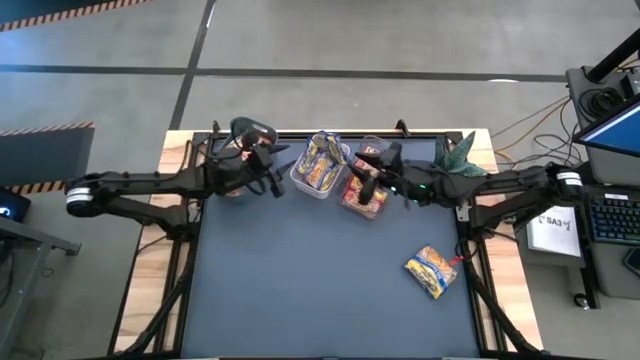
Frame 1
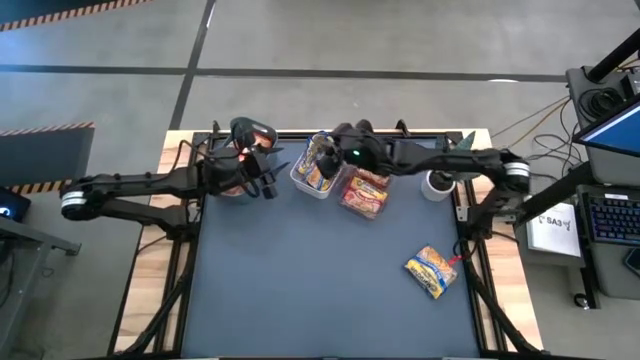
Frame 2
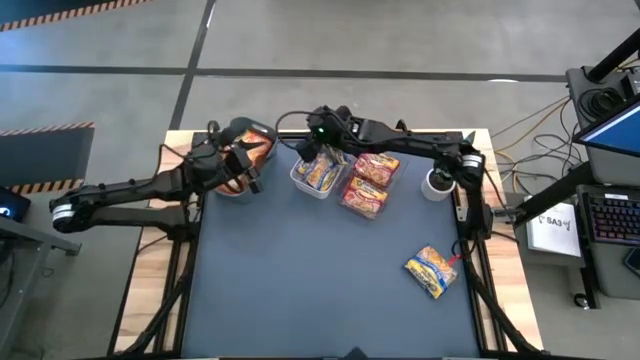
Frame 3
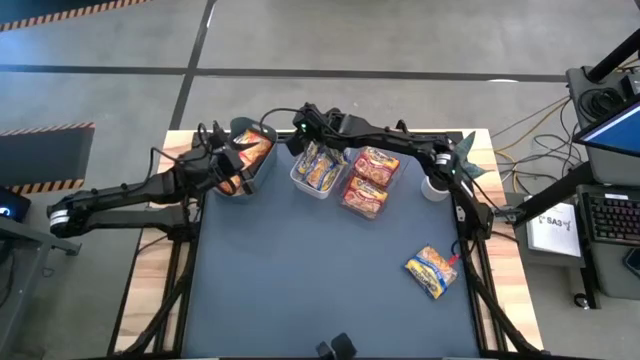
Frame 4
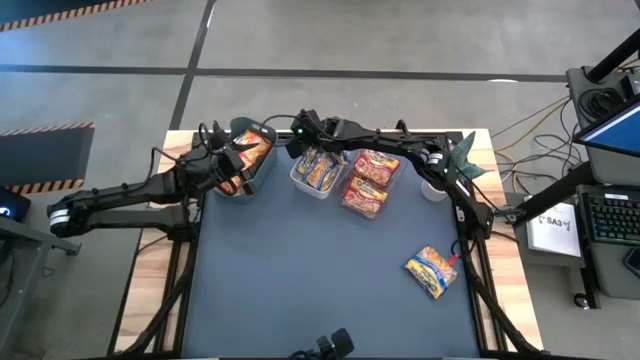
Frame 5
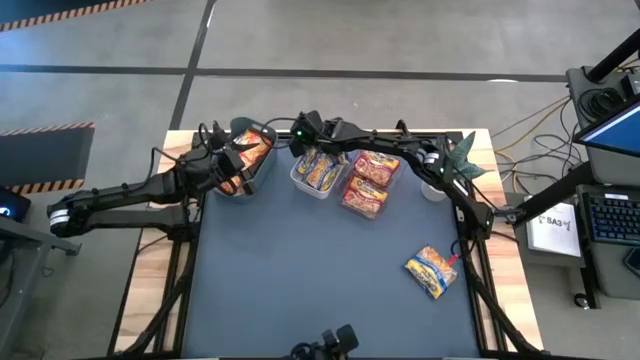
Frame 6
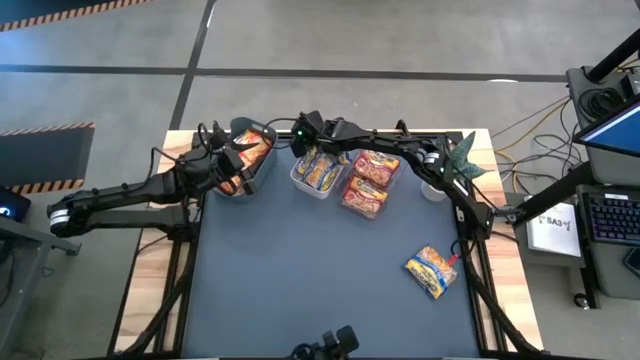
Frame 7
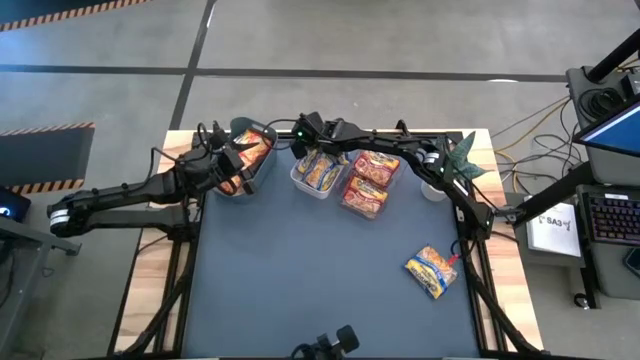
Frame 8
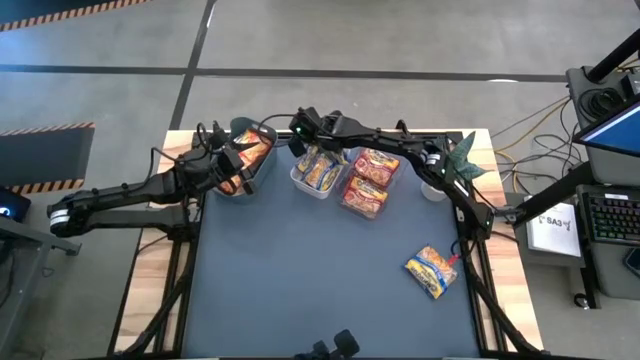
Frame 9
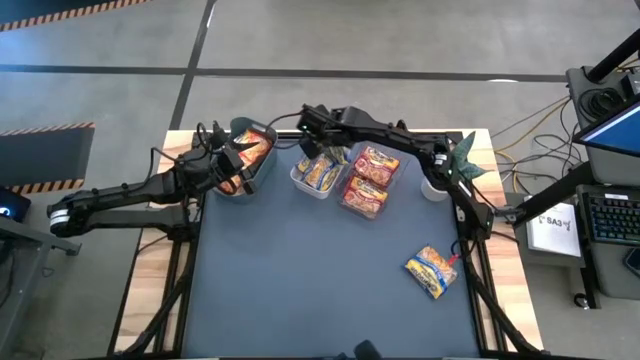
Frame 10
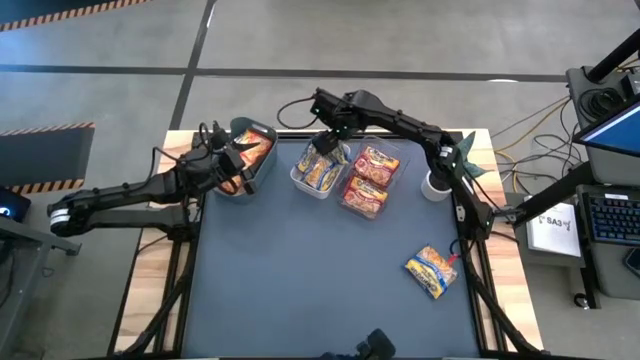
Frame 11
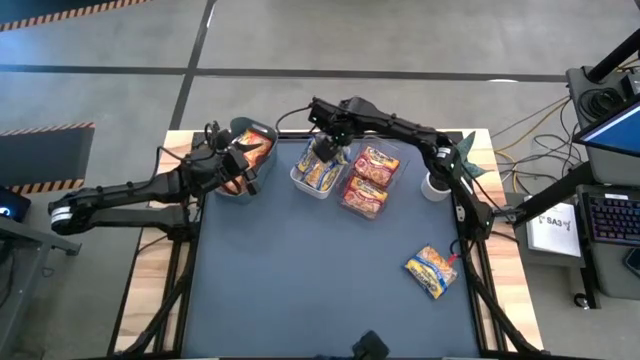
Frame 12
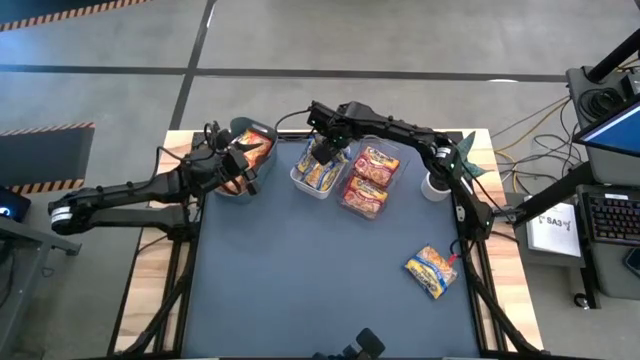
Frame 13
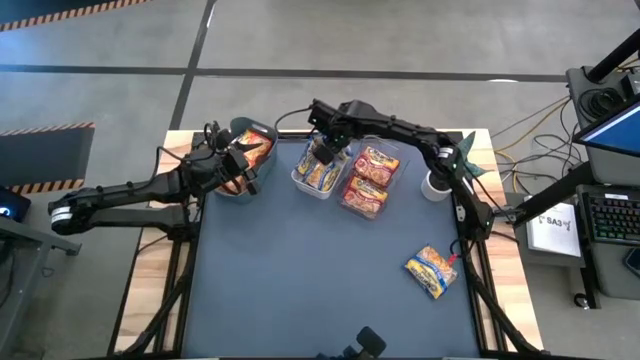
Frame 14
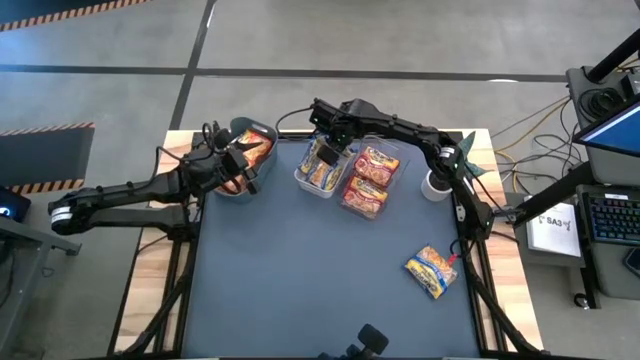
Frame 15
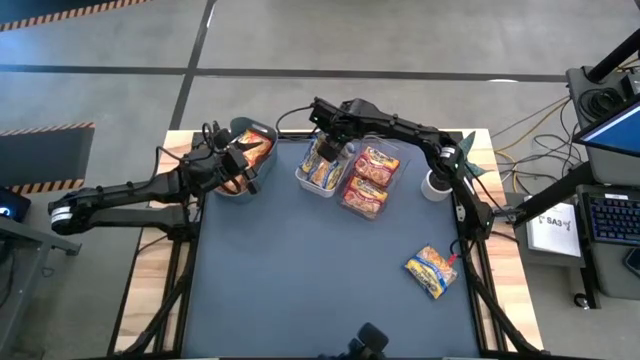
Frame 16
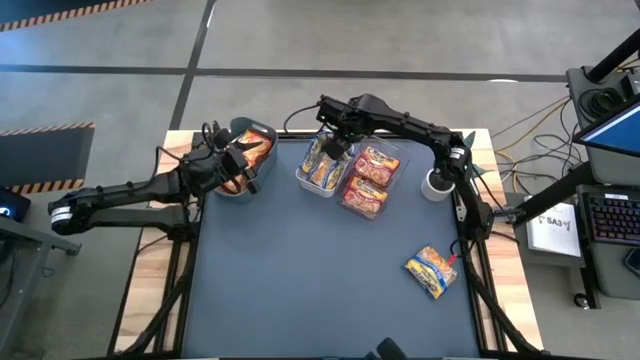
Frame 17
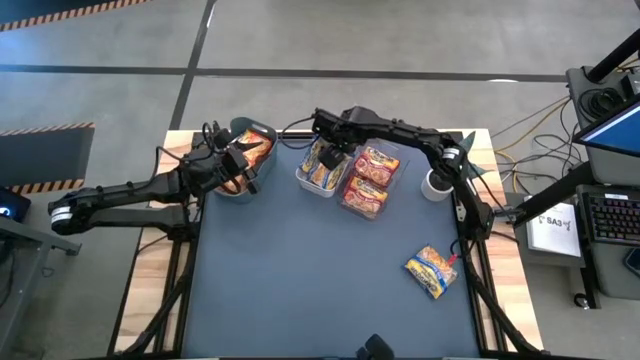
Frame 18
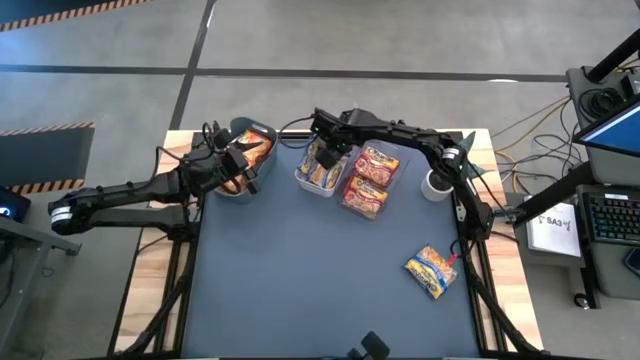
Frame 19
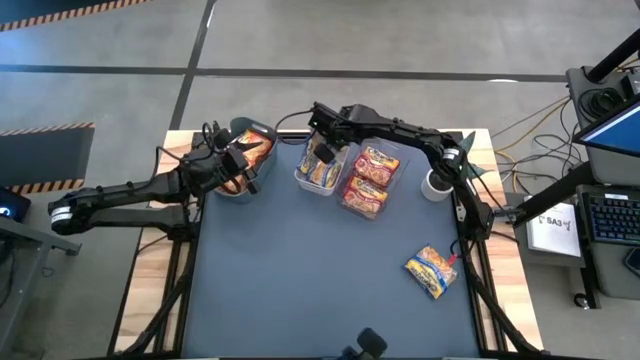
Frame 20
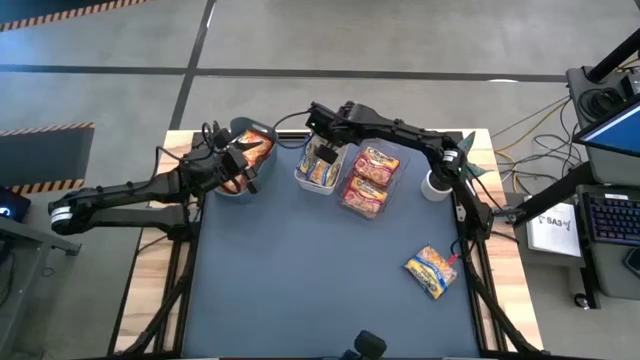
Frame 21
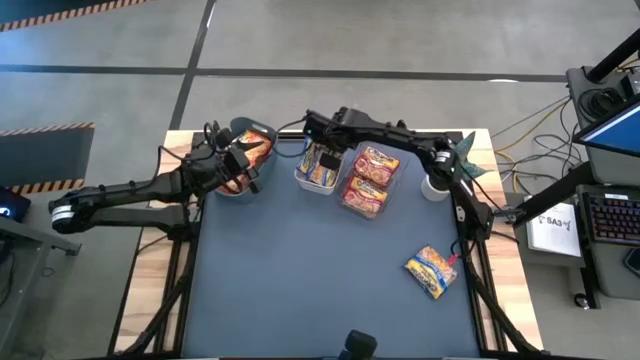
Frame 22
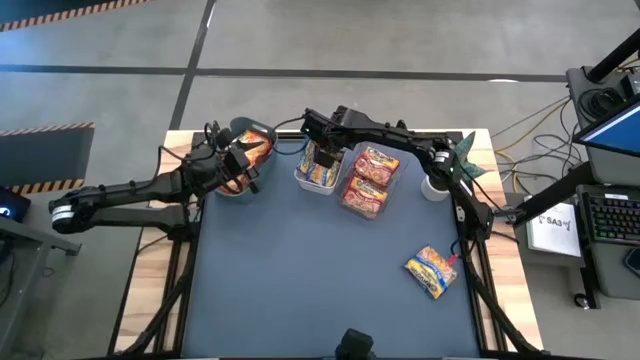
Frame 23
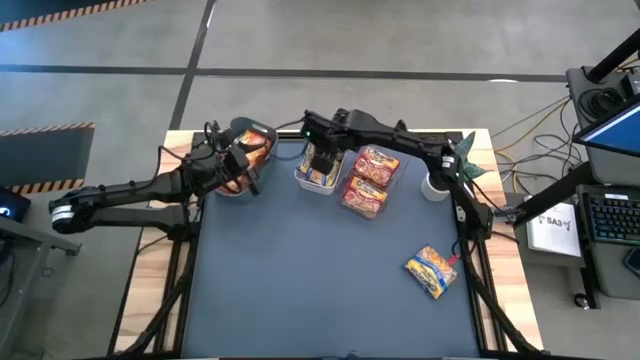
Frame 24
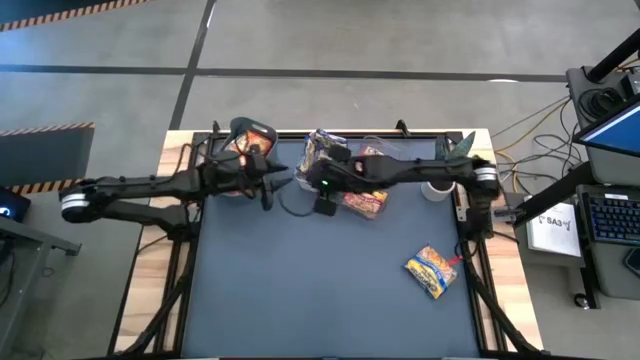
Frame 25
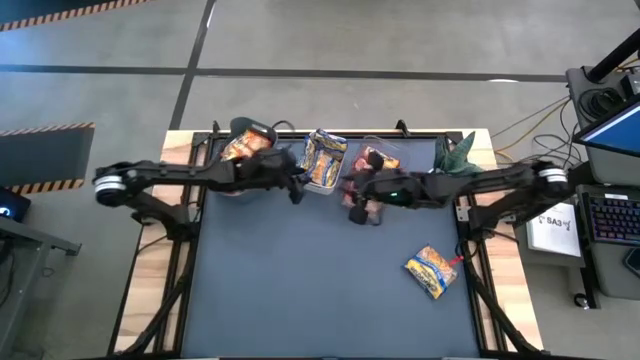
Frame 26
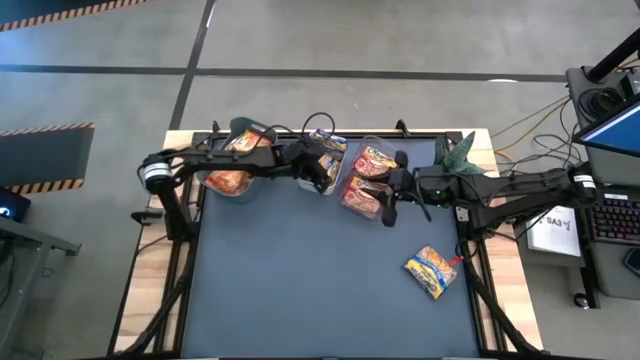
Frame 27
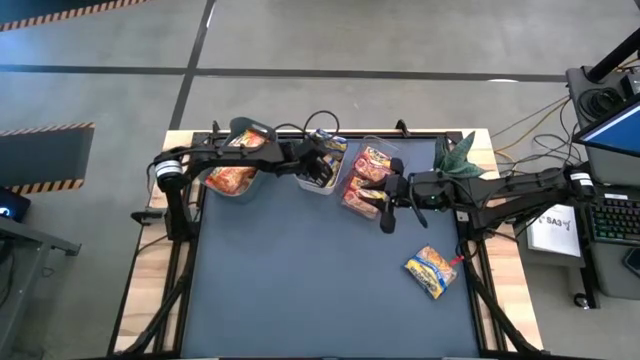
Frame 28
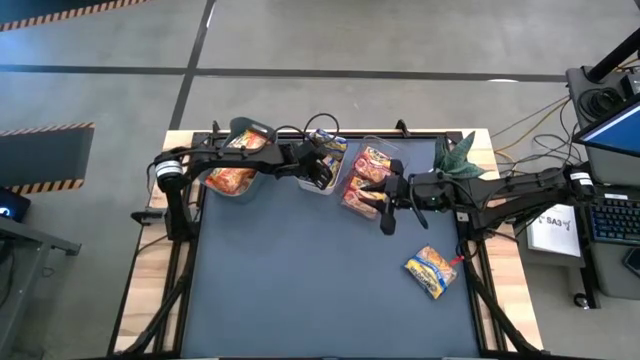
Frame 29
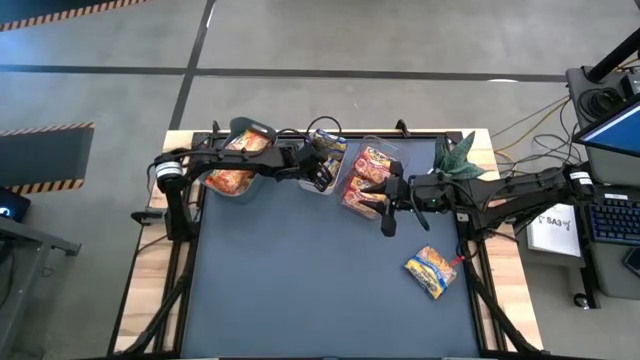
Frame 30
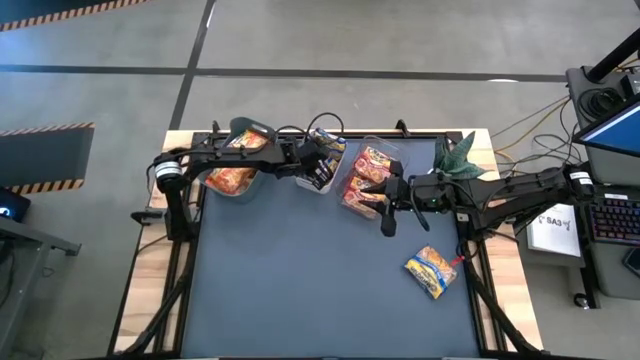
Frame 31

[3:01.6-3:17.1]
Task: Sort Maruchan noodles
Adjust the blue noodle packs in the white bin

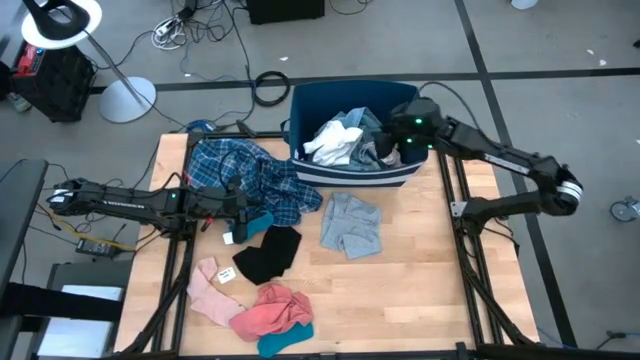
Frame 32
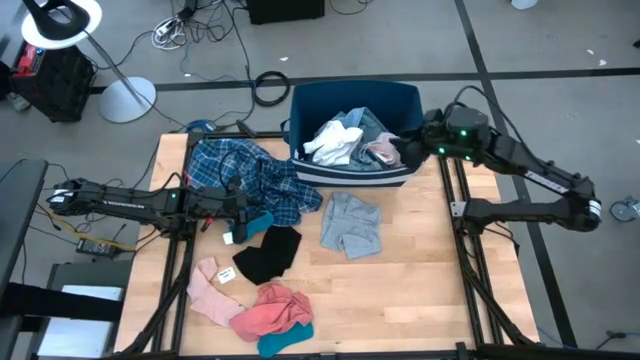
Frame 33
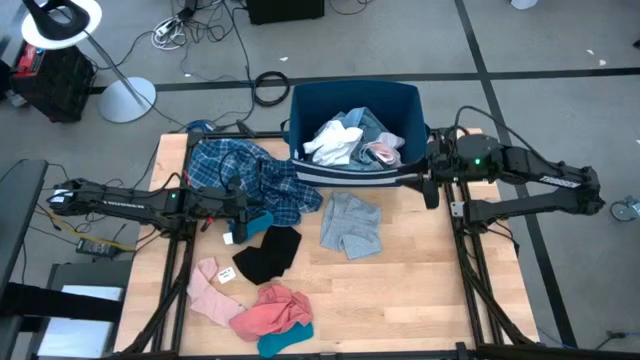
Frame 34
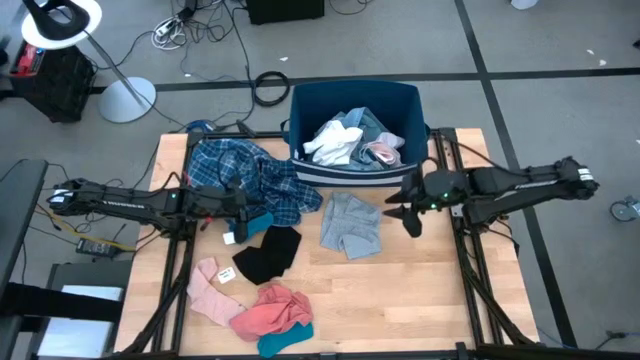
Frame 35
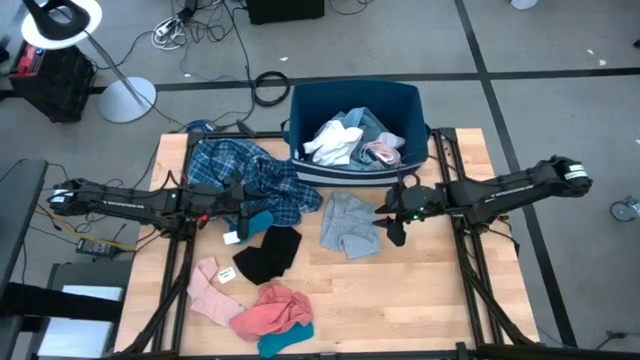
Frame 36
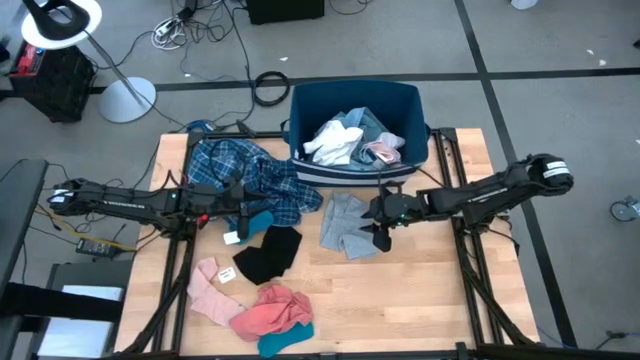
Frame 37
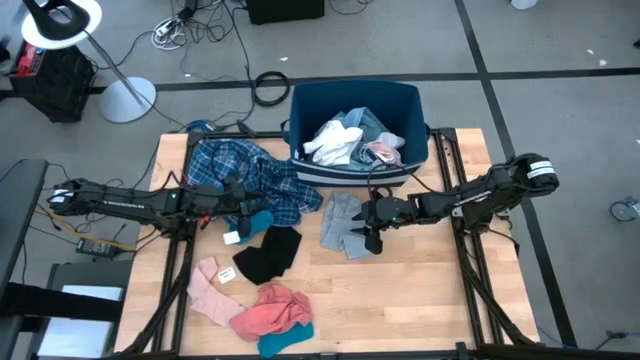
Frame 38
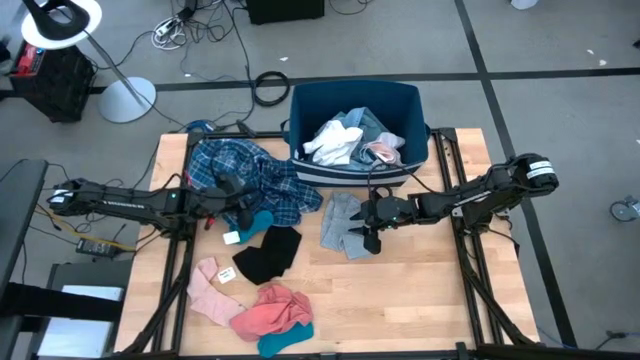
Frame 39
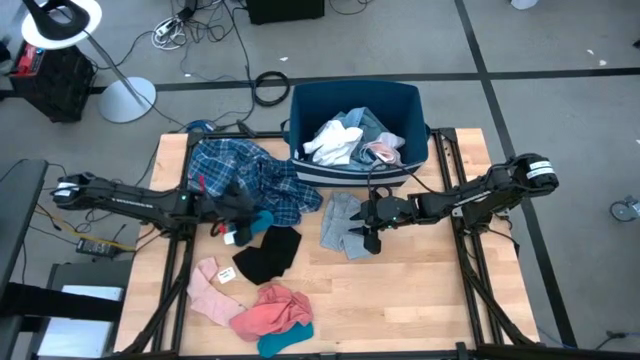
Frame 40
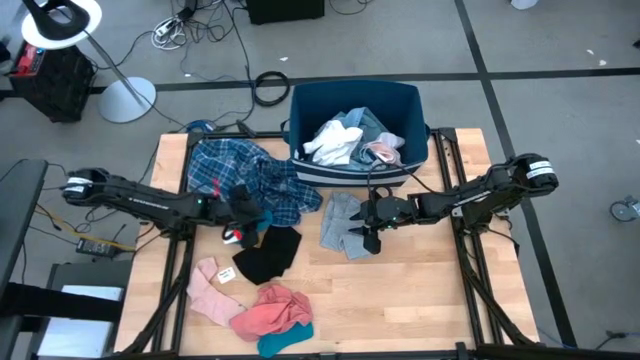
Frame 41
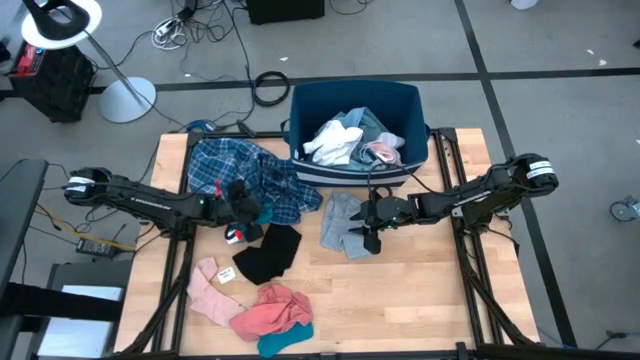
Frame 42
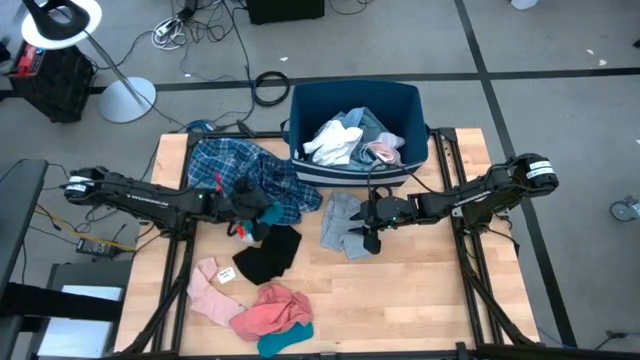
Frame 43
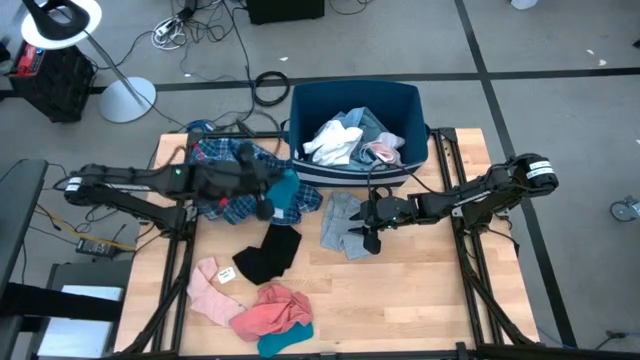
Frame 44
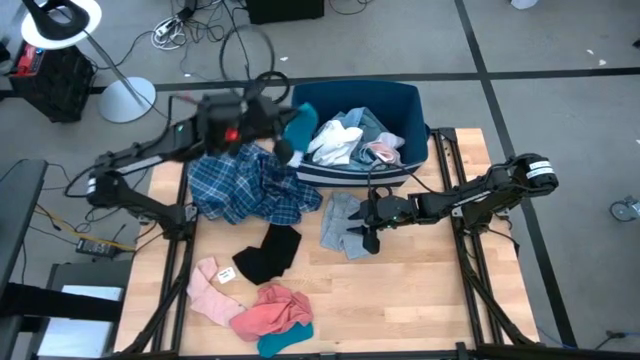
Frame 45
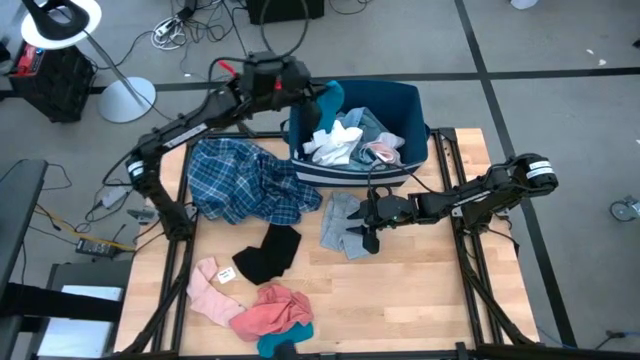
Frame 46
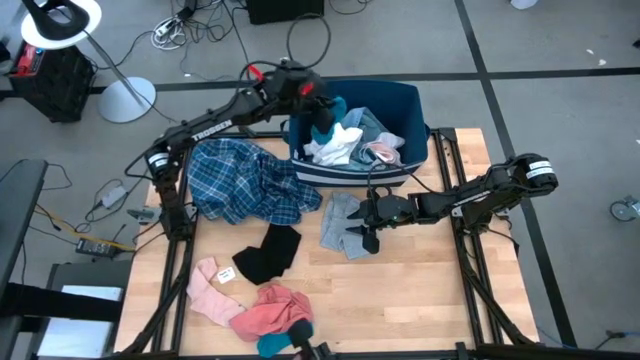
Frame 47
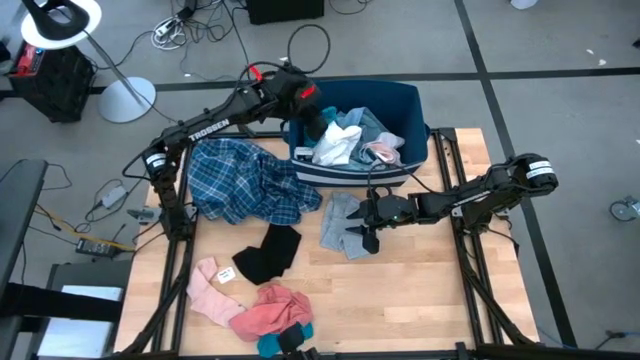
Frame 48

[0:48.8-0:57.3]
Task: Sort clothes
Put the blue sock into the blue bin
